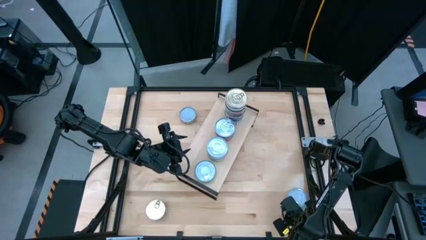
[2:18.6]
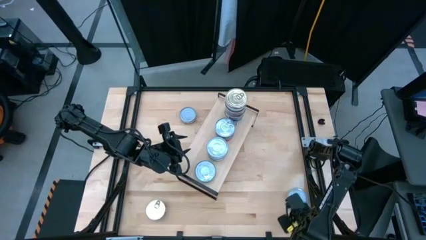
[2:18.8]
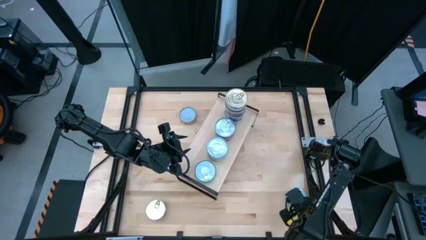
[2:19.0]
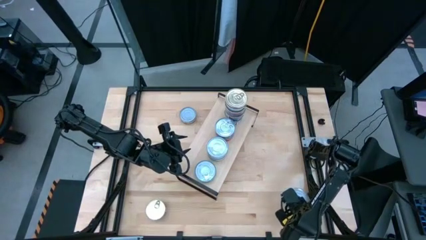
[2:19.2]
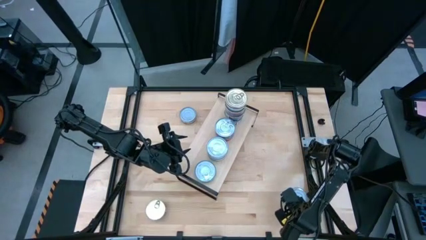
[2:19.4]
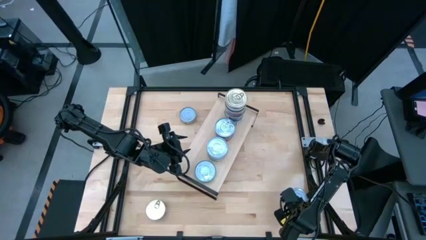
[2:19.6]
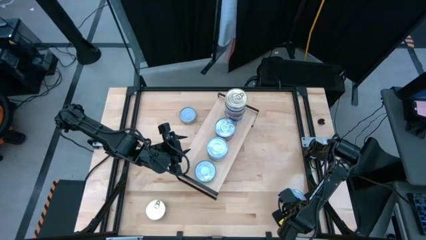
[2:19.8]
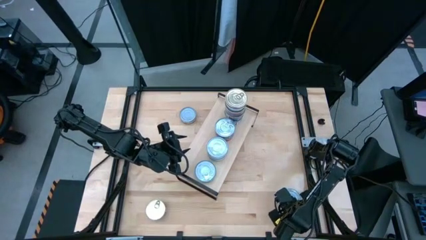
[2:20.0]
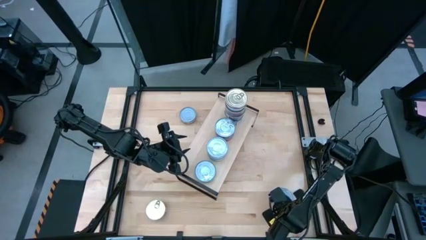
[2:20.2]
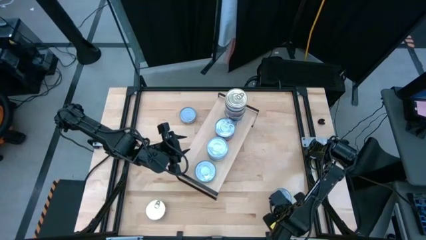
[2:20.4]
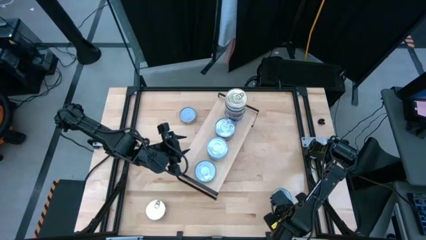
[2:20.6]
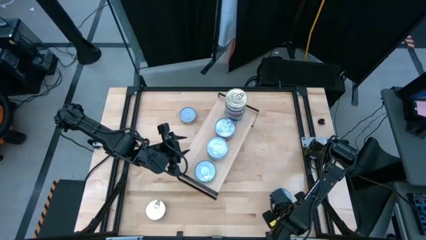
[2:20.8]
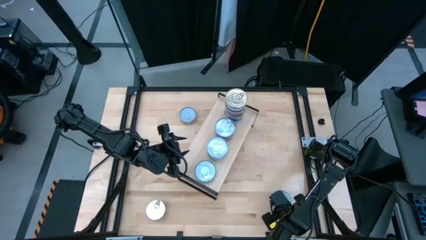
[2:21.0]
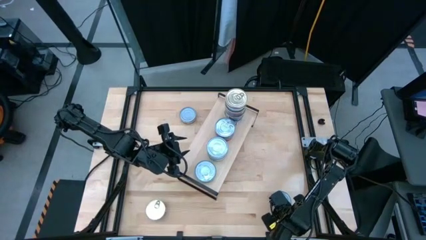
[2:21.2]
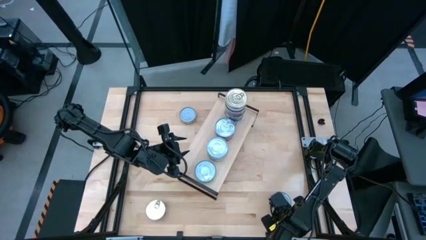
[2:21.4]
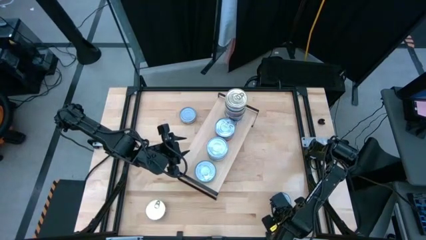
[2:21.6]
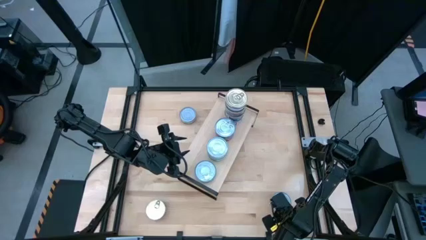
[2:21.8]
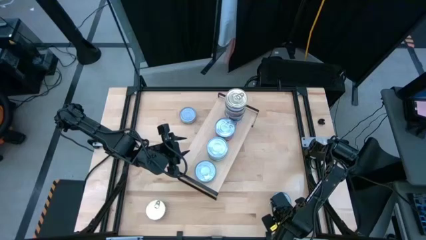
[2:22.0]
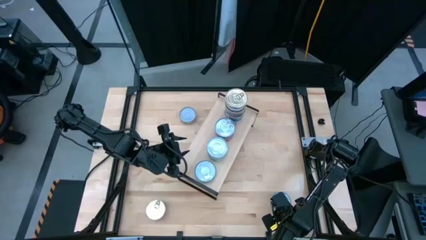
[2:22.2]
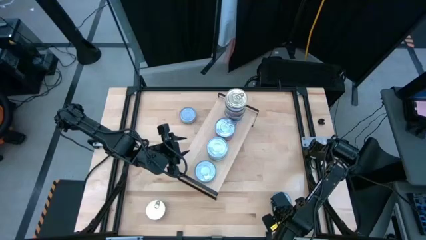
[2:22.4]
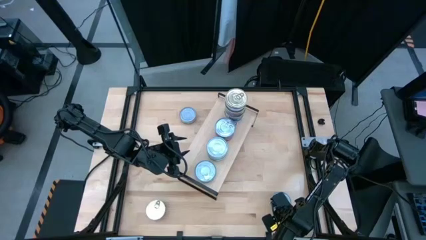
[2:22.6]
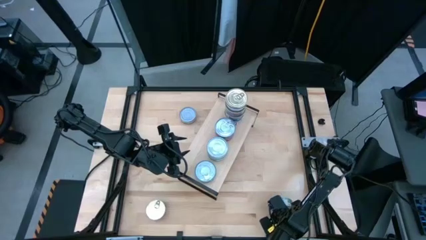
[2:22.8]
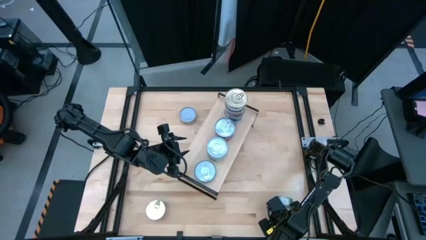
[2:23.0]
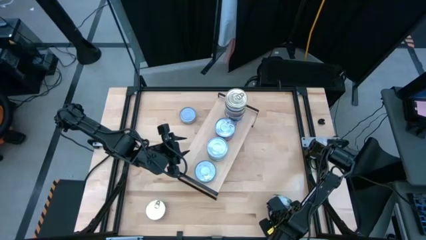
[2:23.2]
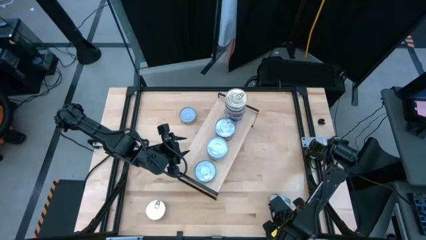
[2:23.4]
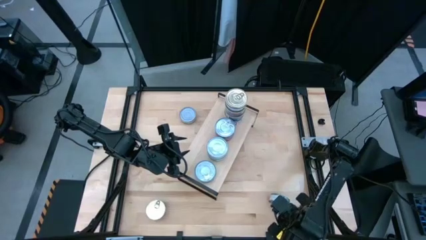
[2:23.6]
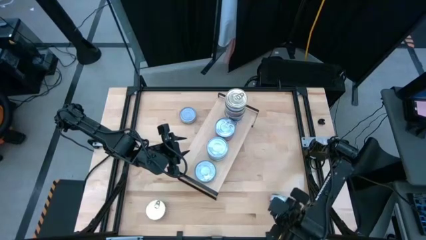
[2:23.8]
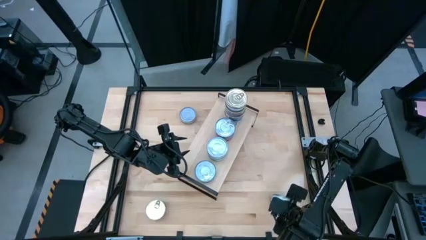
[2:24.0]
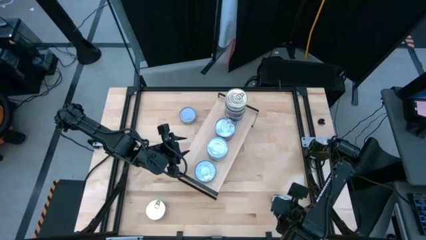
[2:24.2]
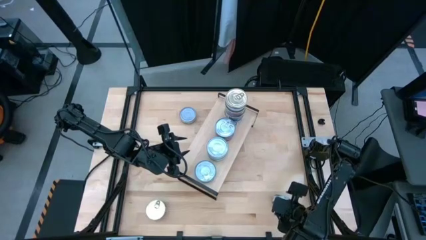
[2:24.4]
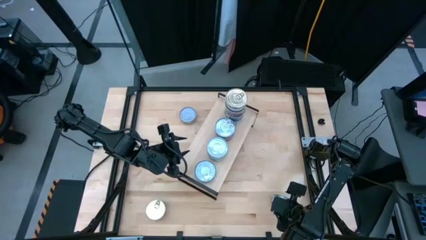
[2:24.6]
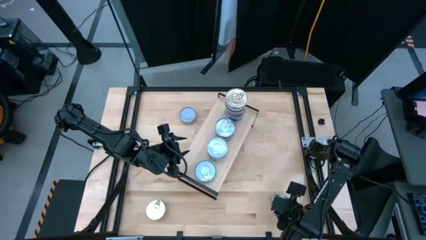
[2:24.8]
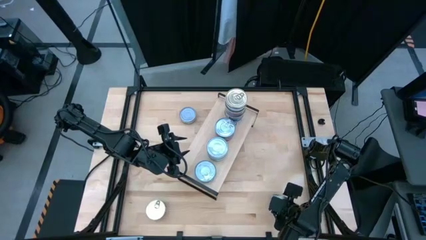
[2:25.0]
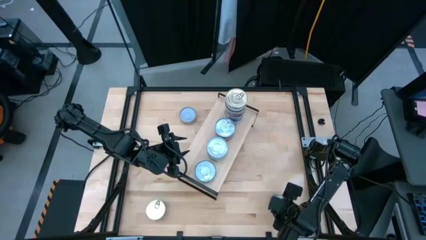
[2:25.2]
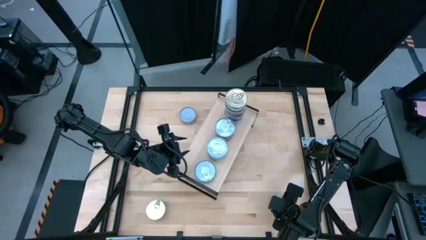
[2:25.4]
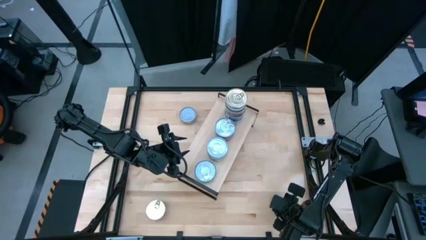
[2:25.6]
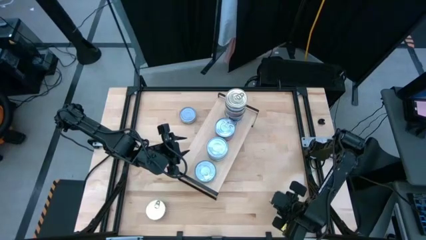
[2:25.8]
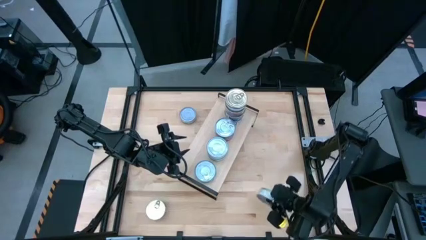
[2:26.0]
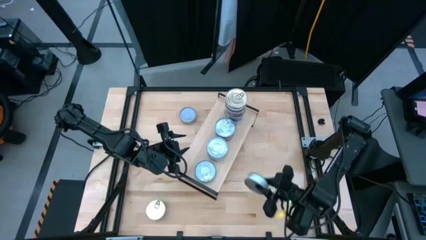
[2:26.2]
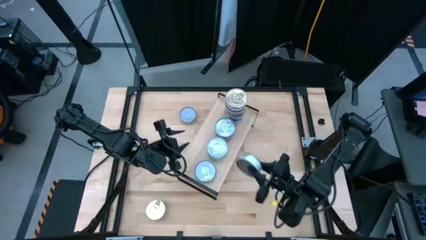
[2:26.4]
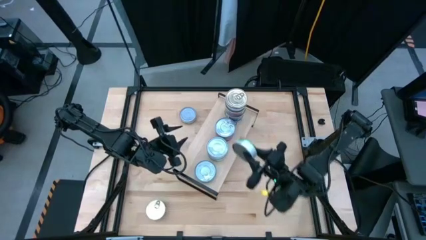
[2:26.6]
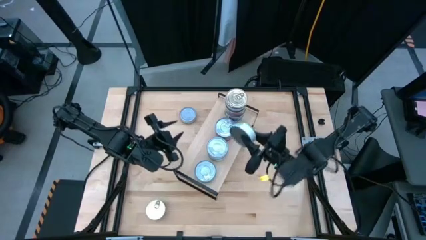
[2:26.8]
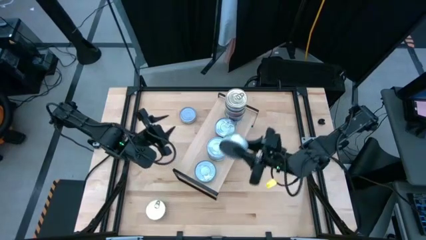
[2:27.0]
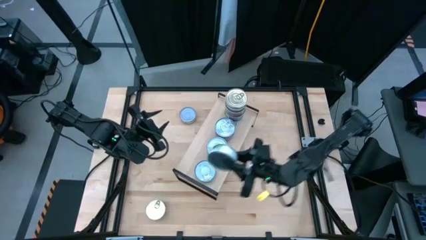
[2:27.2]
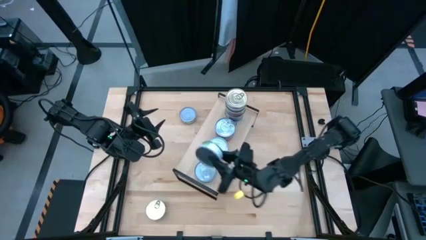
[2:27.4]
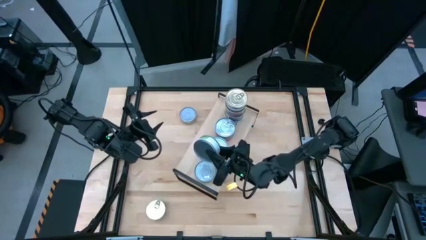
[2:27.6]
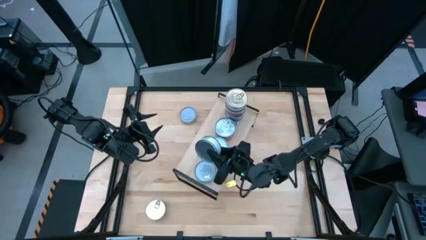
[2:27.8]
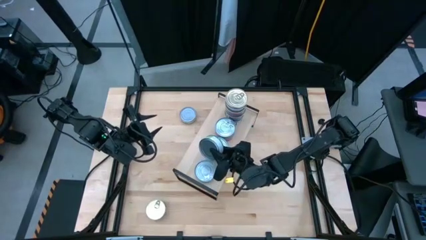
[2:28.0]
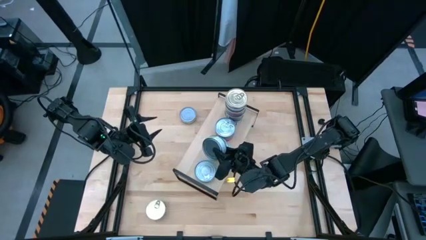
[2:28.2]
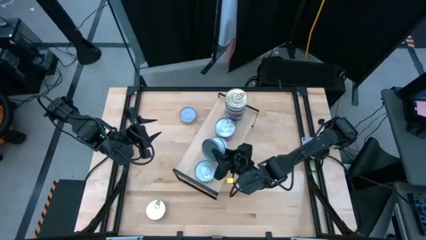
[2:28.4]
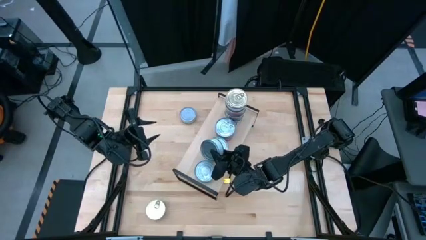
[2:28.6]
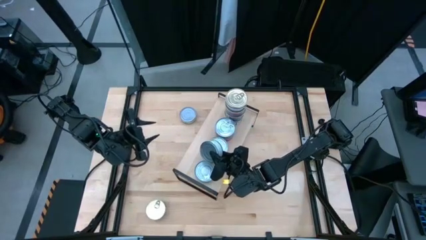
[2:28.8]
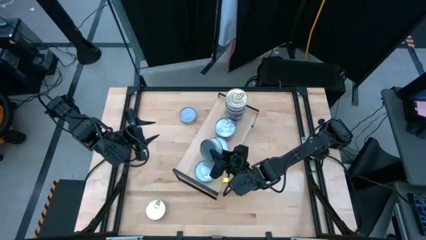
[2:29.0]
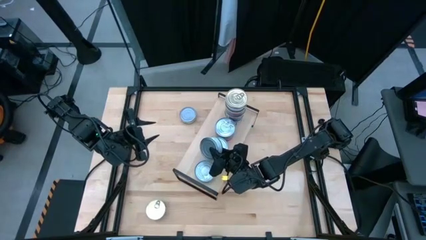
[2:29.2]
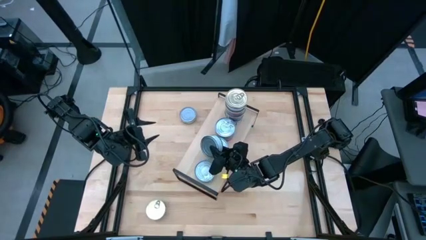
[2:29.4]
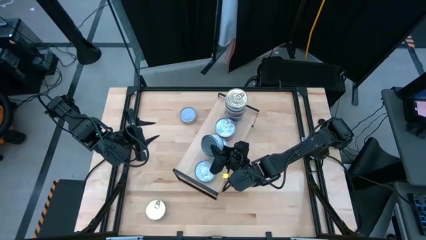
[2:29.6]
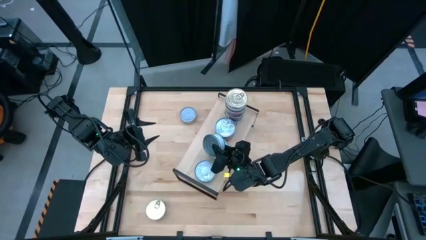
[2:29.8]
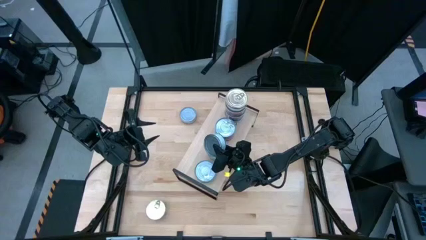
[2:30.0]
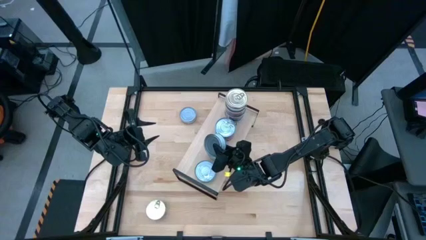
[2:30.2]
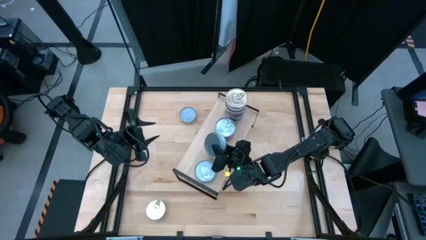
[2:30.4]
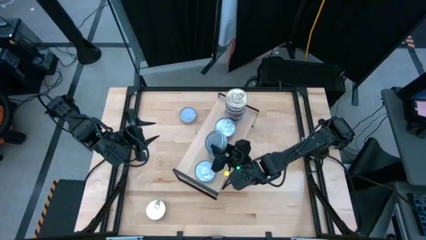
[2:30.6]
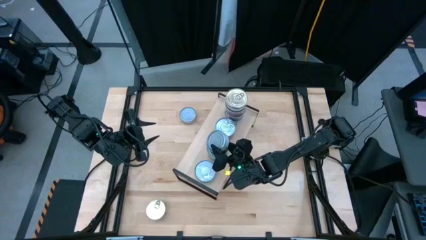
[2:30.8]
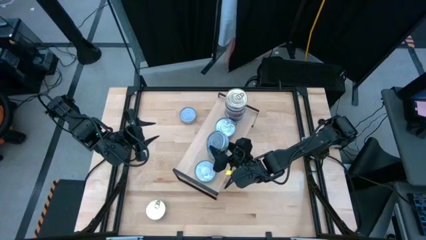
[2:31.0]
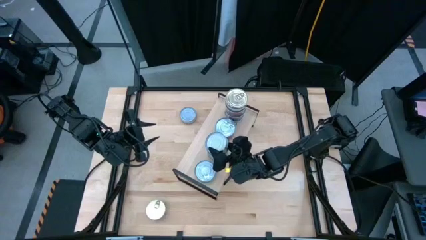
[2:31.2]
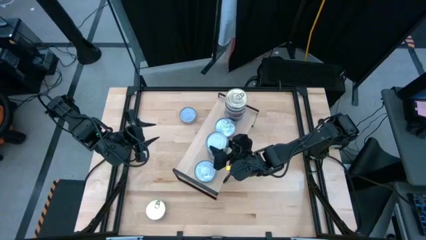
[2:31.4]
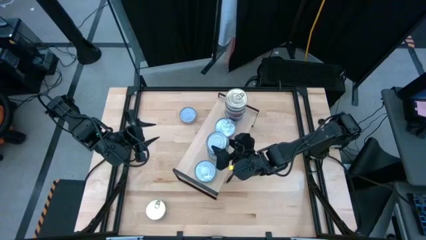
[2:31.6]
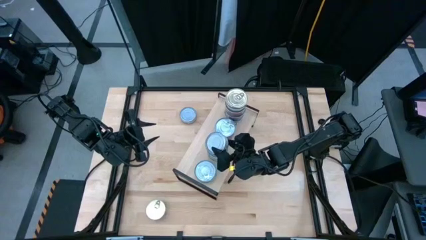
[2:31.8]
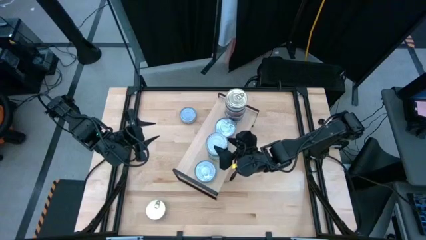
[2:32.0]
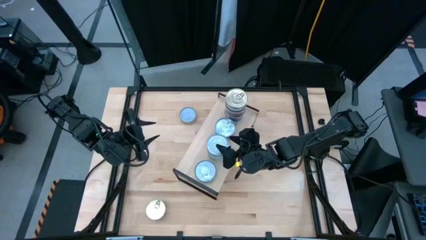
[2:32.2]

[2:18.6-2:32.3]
Task: Stack canned seafood by type on shelf
Stack the green tuna can on top of the green tuna can on the shelf

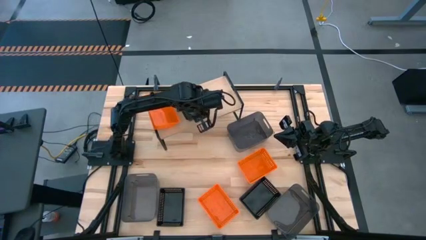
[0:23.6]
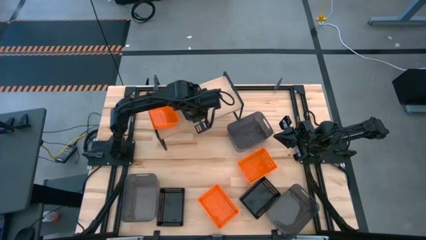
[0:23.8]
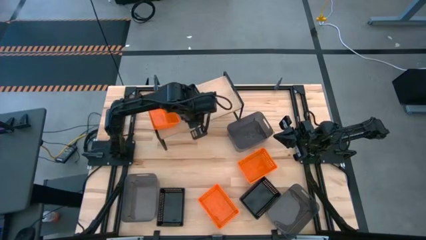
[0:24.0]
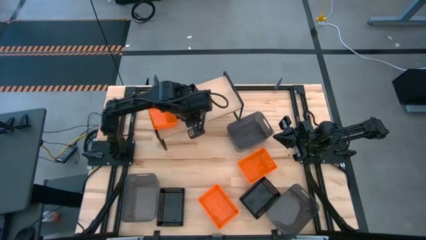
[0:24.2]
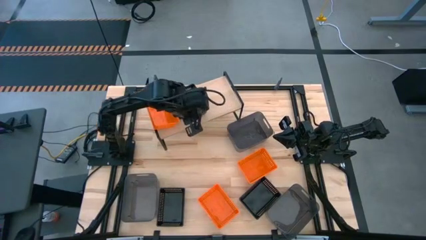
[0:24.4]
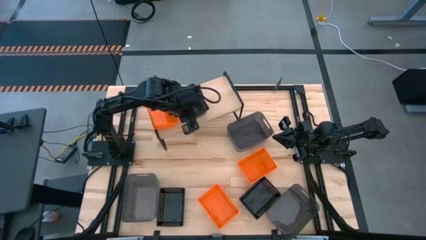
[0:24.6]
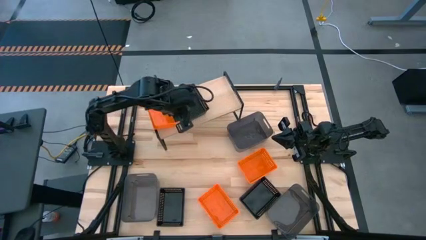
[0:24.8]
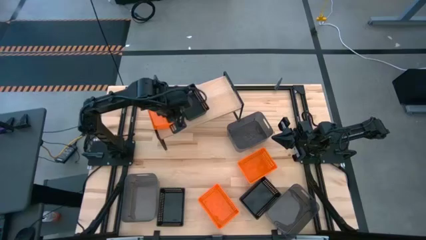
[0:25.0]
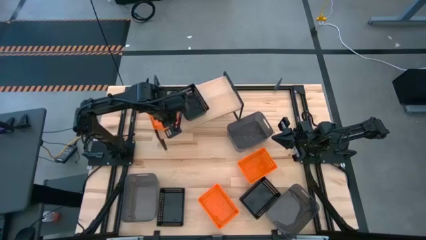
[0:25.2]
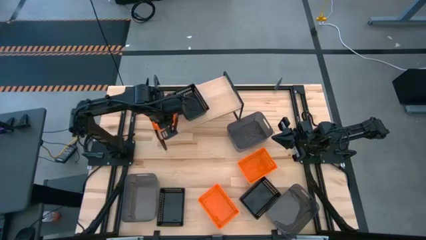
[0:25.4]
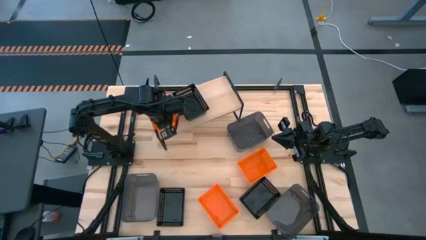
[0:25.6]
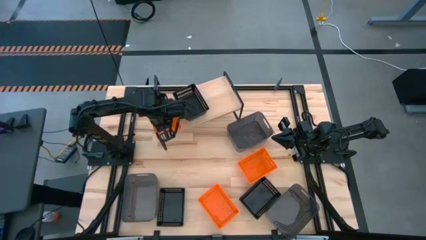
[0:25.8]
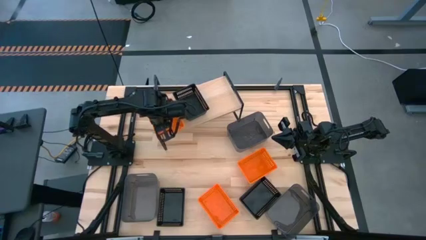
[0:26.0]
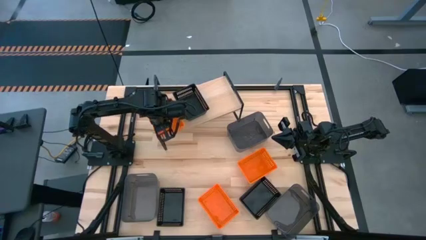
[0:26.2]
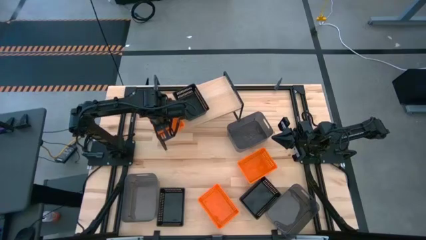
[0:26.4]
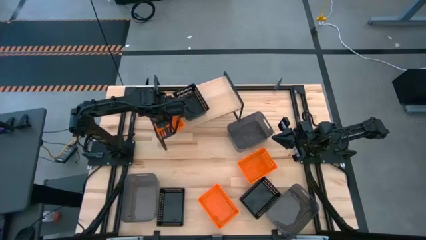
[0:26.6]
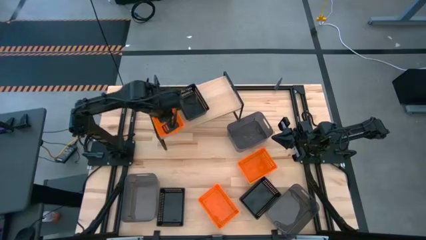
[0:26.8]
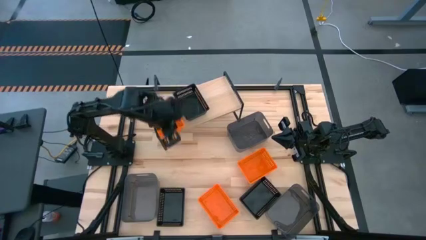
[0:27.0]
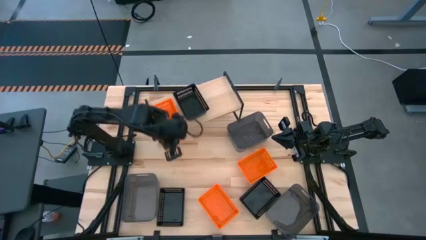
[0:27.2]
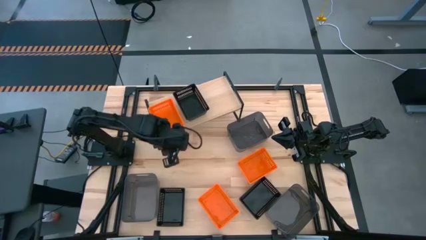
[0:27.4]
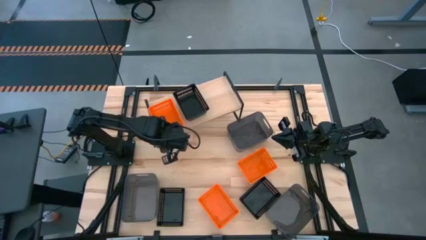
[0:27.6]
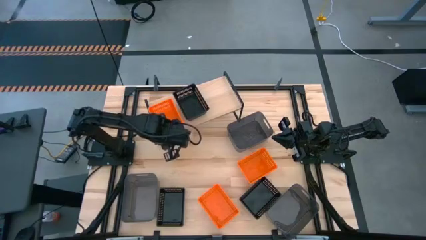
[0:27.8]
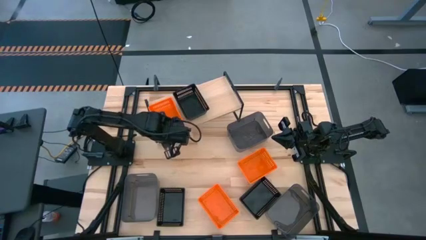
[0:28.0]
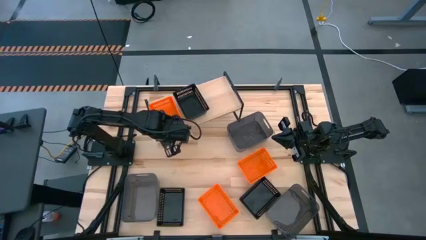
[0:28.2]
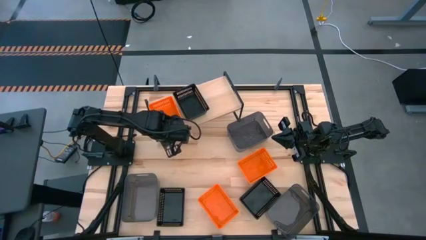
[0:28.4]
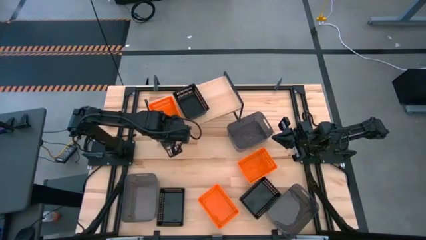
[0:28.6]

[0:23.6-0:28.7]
Task: Stack baskets on shelf by color
Adjust the orange bin on the shelf
